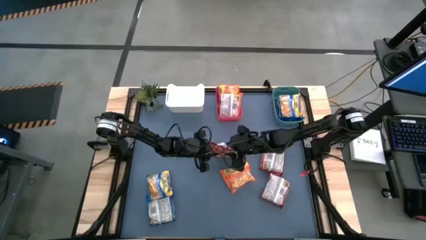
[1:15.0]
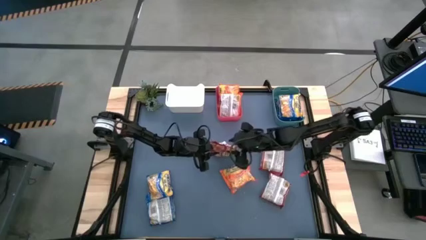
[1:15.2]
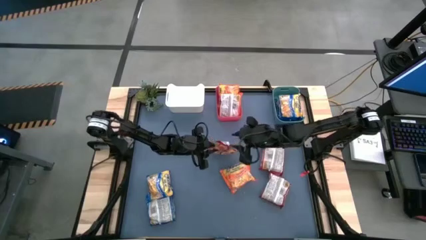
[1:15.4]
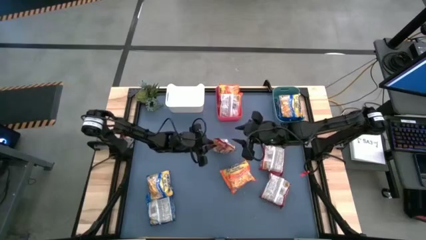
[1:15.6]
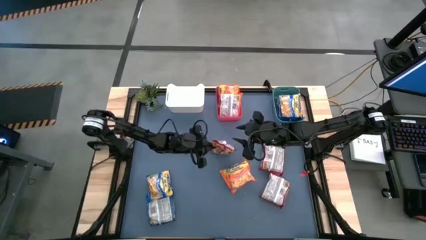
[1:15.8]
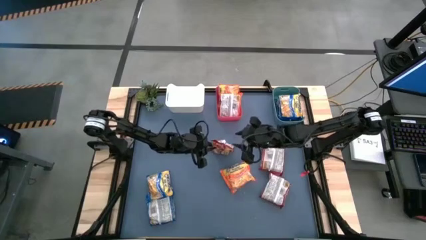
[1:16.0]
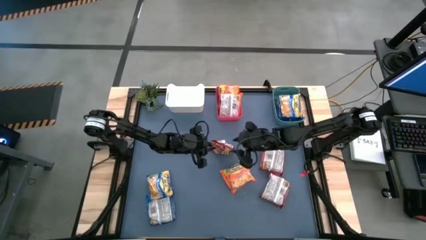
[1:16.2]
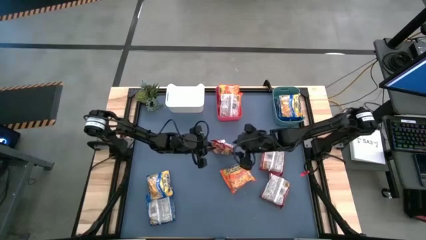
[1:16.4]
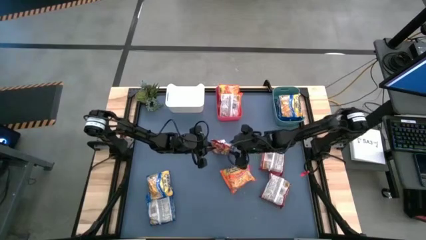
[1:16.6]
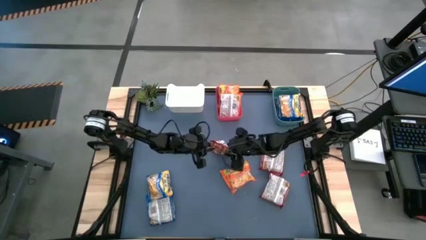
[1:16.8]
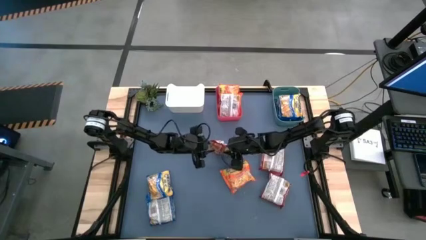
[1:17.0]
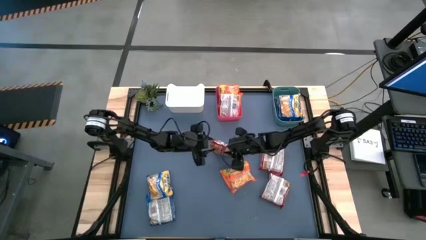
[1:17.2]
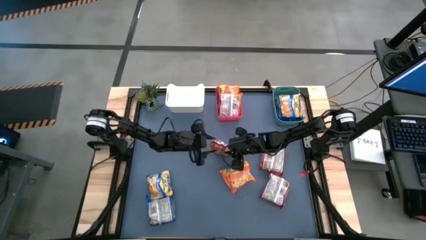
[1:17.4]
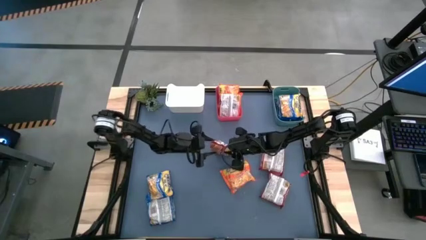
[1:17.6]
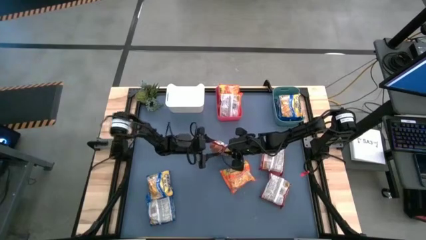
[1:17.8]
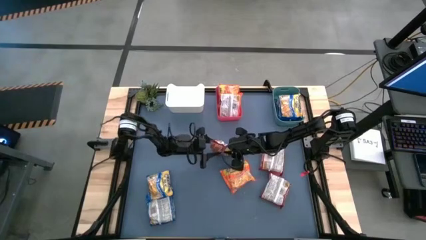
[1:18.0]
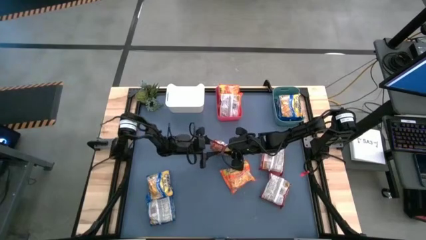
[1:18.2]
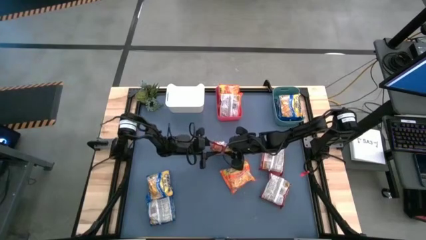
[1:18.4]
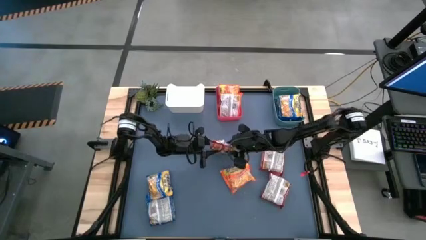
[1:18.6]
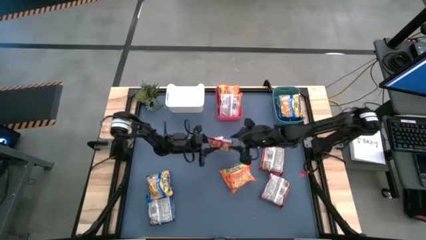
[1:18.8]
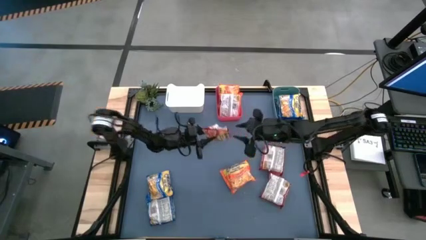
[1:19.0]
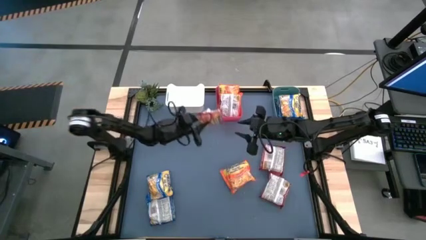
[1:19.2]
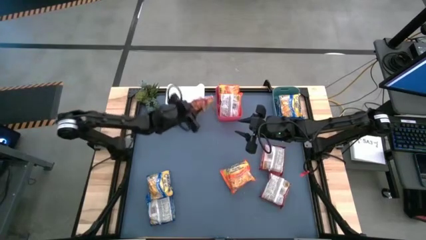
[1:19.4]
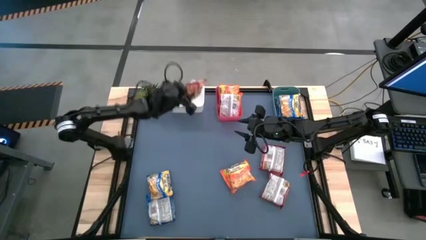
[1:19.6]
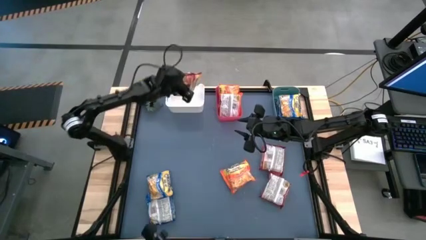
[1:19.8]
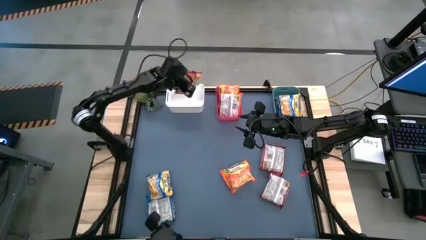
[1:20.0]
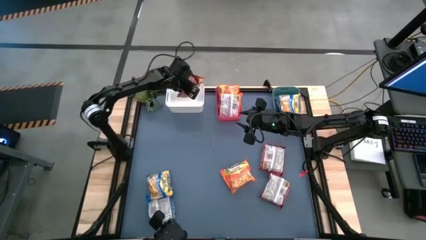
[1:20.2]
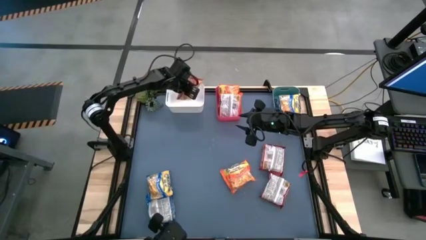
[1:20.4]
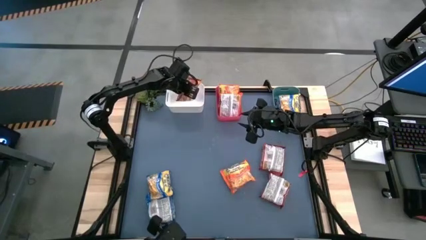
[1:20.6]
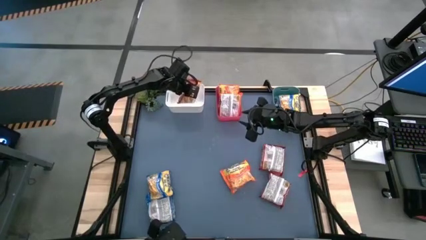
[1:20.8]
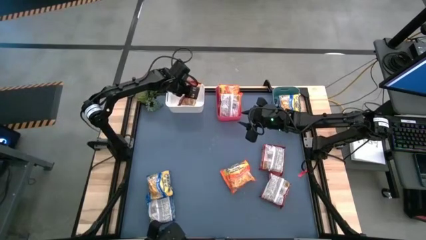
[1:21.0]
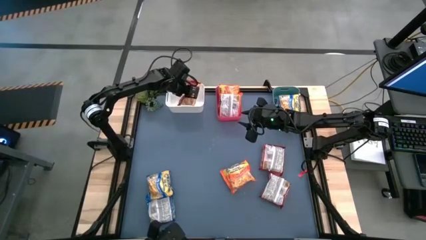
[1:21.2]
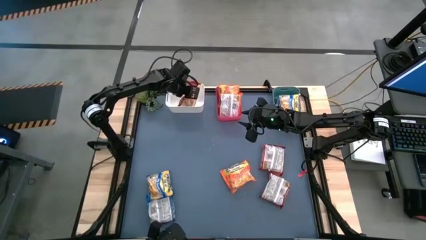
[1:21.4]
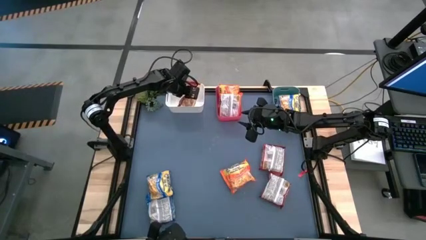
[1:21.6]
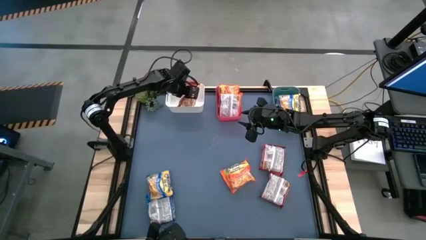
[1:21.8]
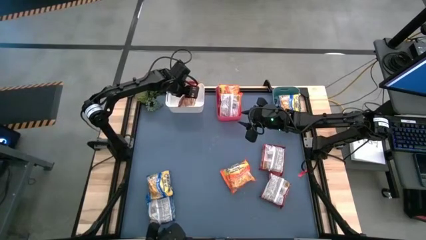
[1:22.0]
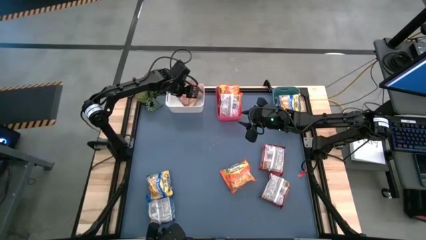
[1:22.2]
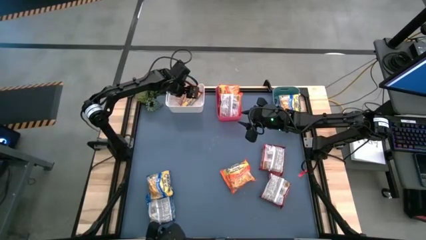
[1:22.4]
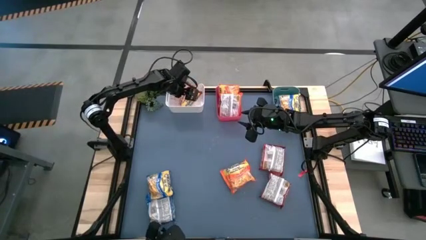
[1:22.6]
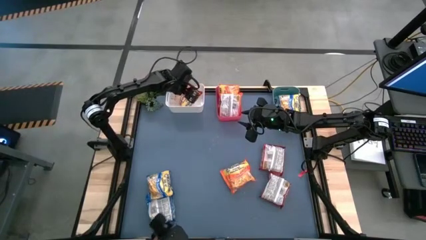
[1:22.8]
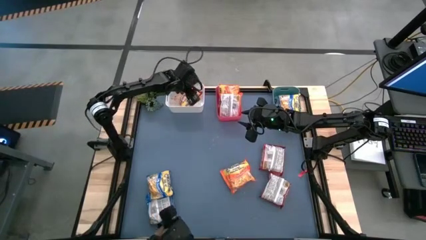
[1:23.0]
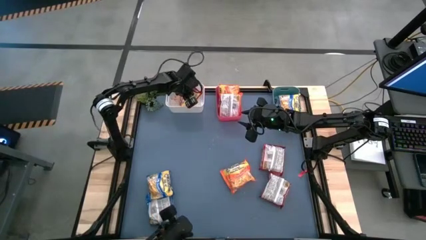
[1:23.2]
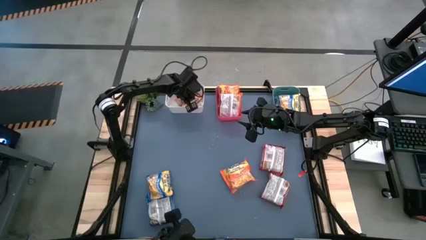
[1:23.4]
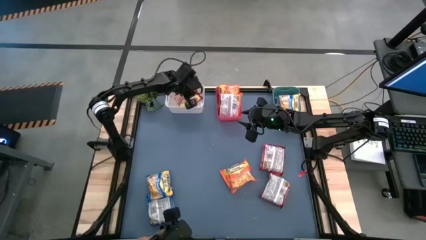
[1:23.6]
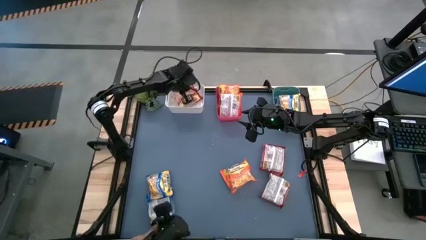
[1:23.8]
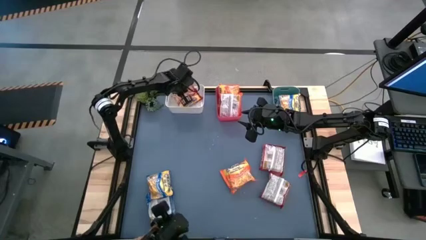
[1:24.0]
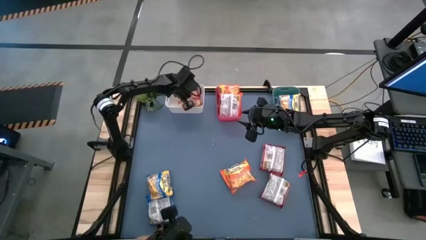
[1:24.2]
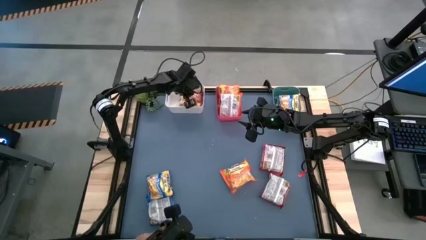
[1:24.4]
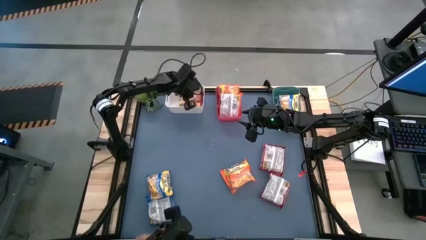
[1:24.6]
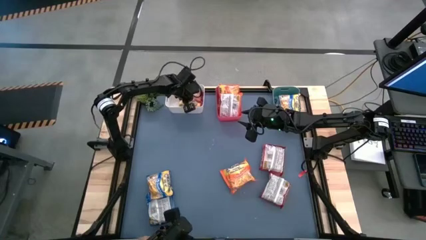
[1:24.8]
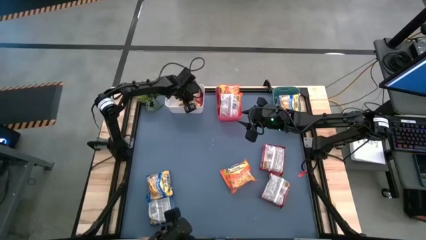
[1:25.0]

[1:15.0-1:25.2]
Task: Sort Maruchan noodles
Put the top left red noodle pack into the white bin
